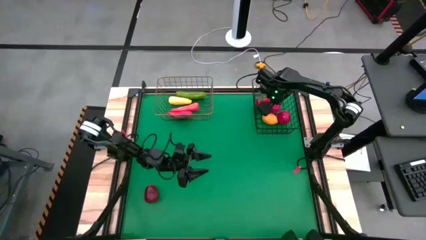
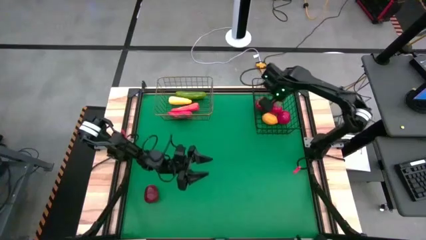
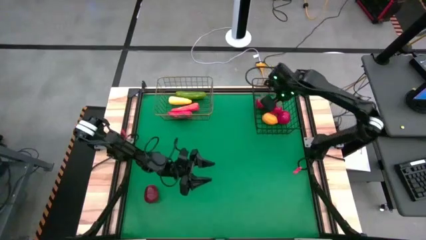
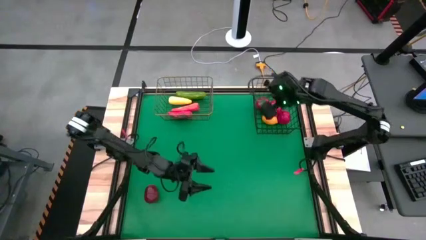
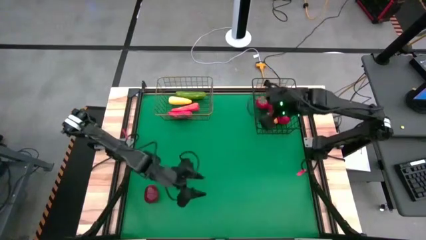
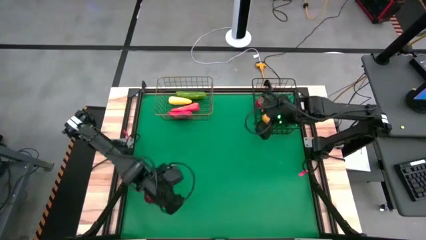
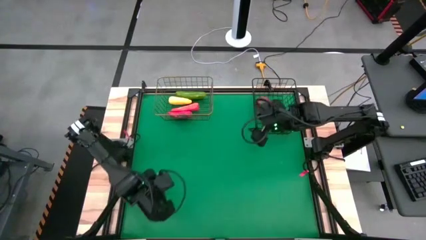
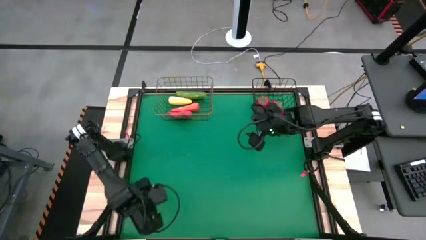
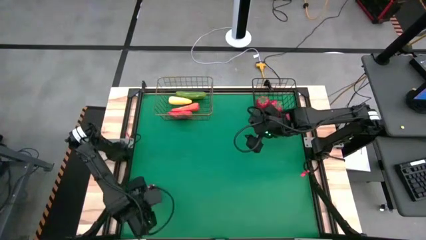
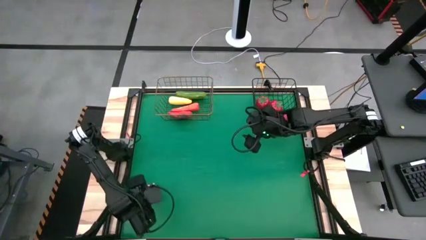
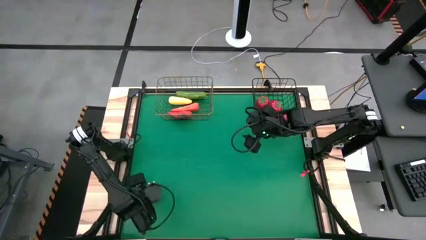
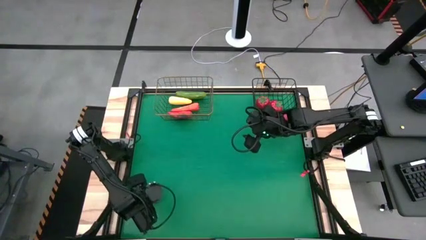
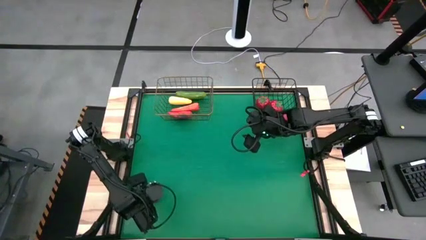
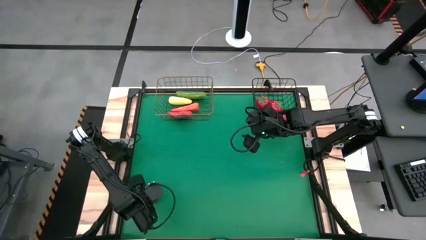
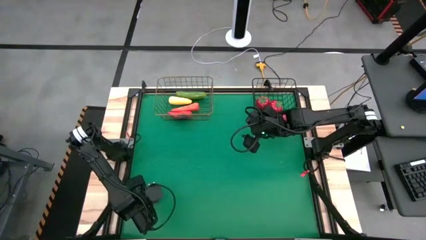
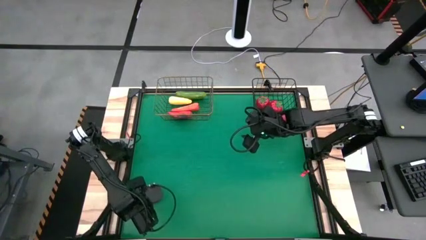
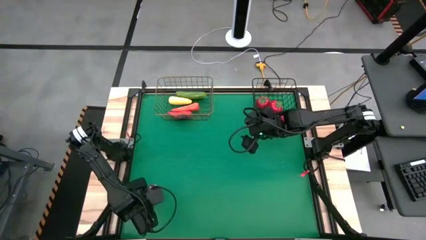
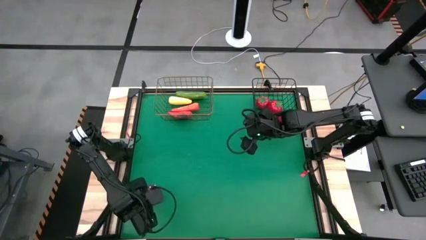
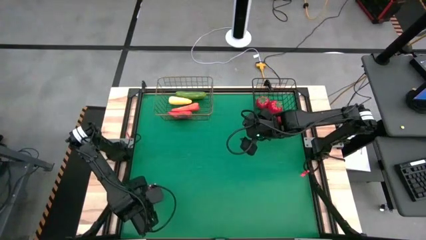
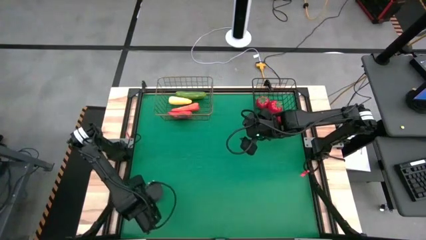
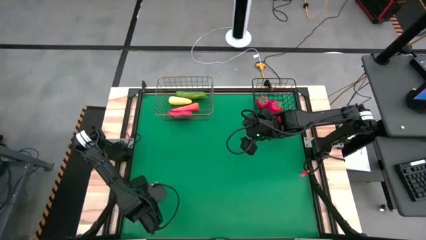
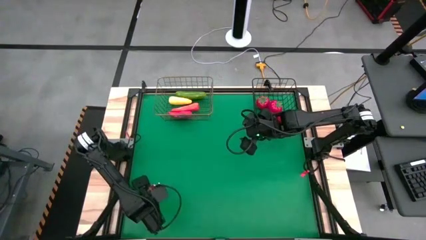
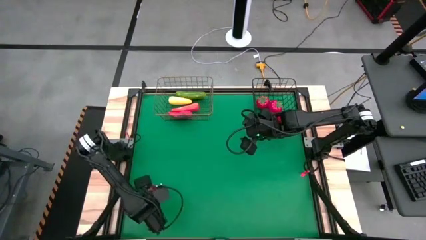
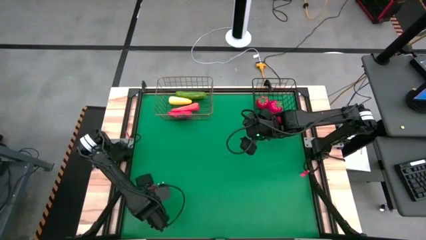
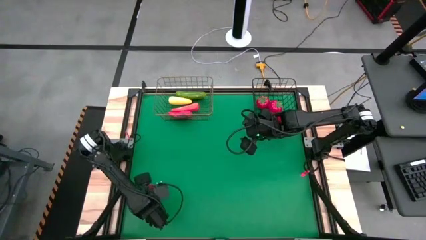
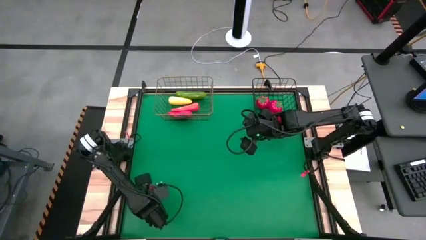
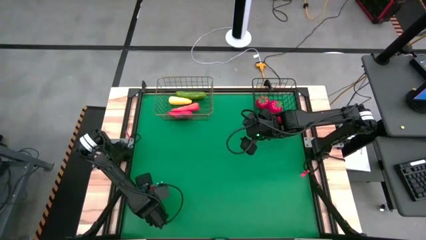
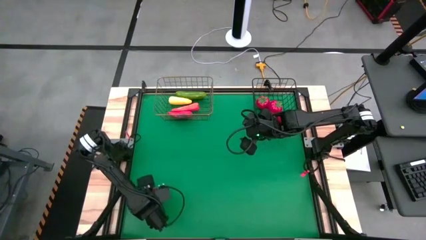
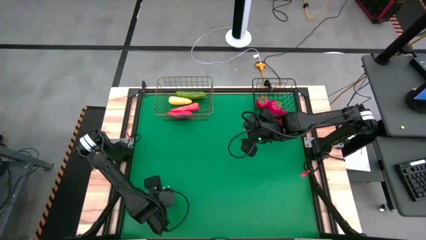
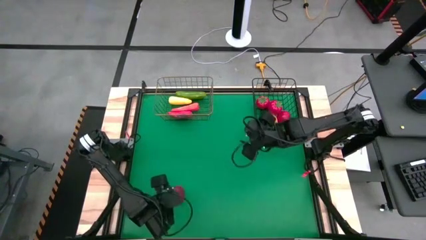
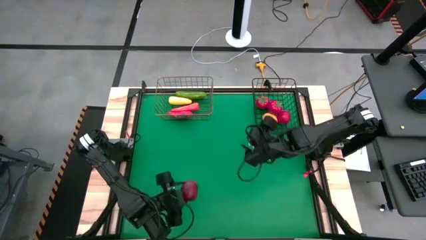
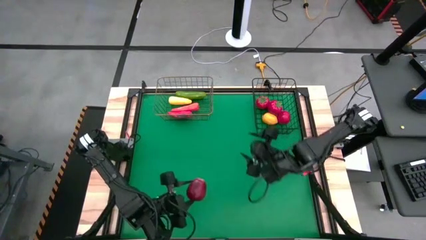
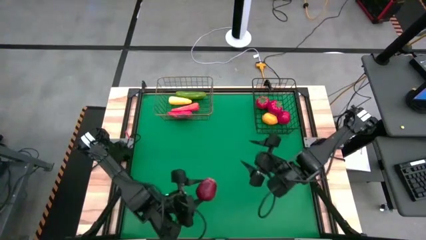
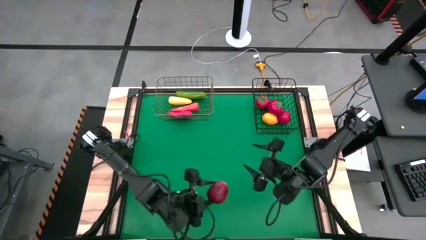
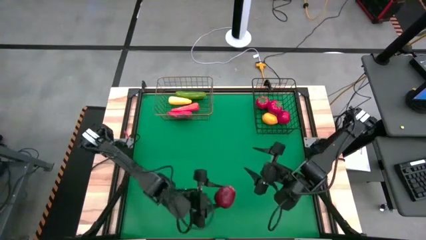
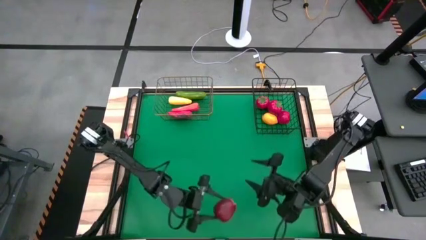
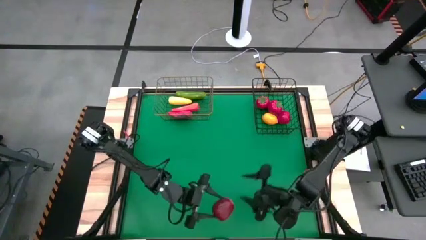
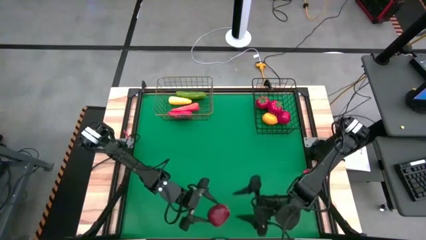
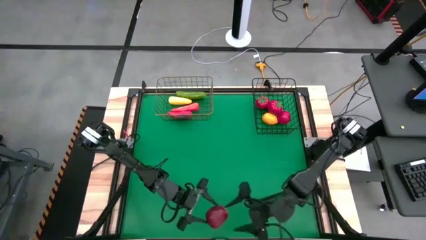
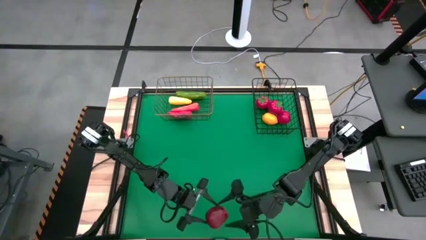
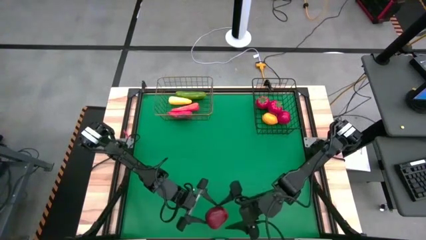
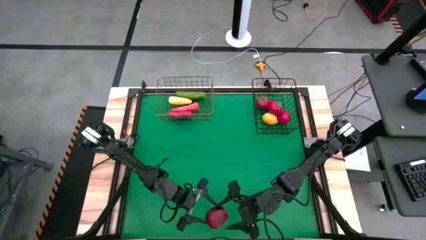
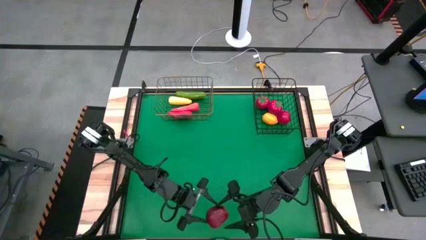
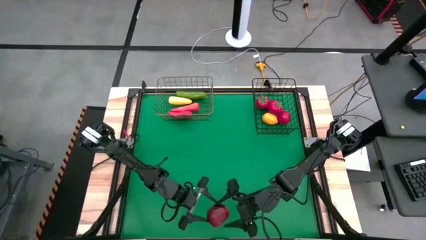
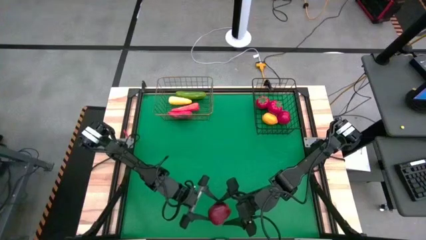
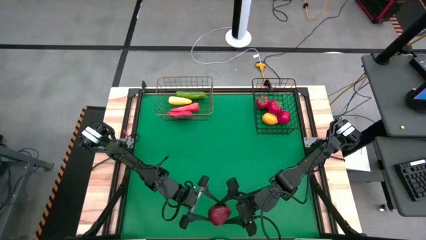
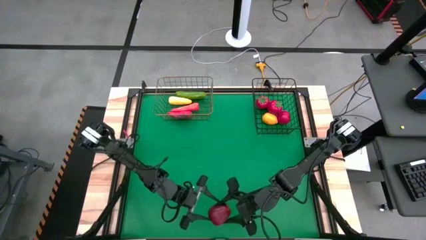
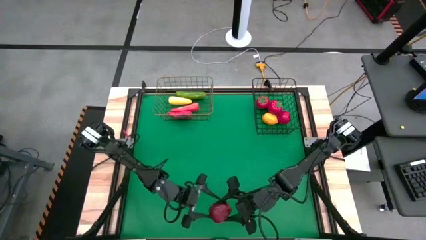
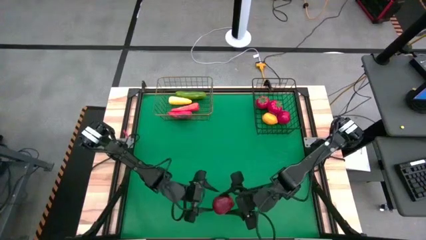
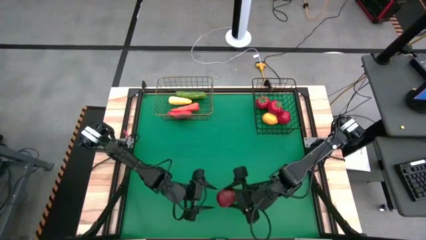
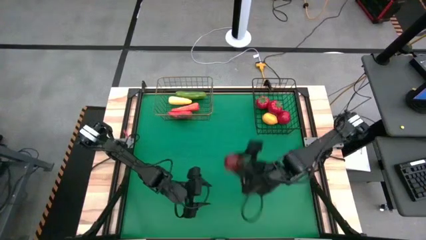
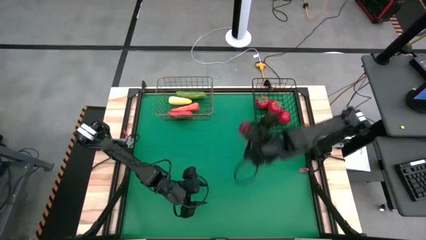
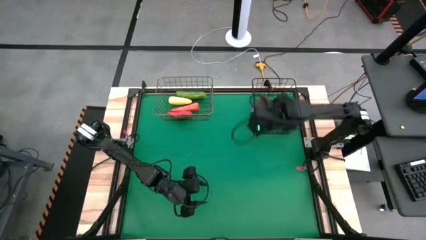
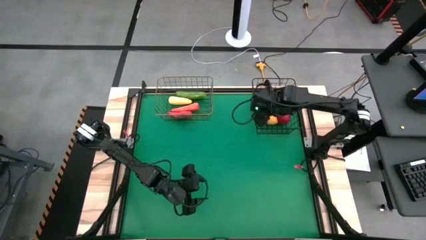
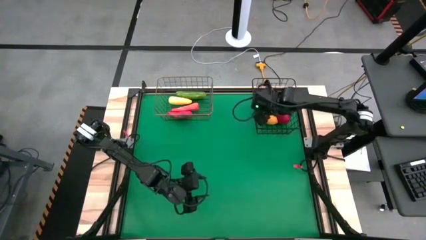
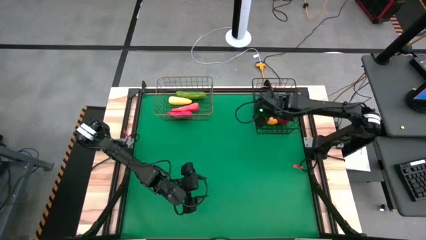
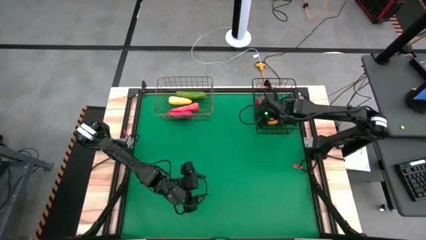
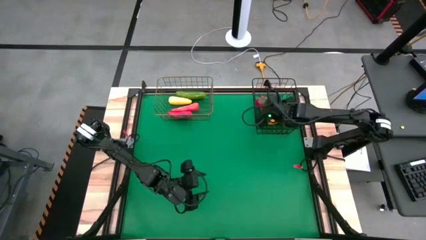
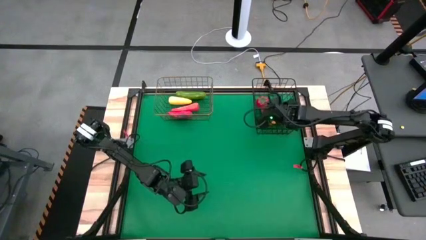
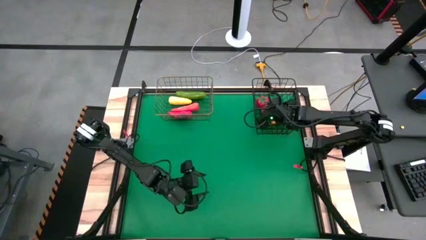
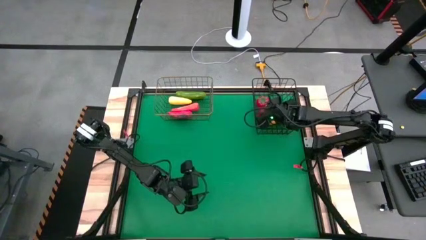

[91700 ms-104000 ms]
Task: Sort produce into baskets
Put the red apple into the black wire basket

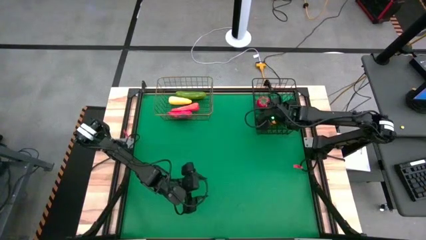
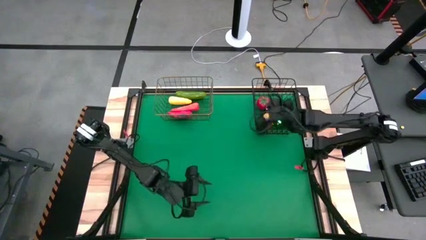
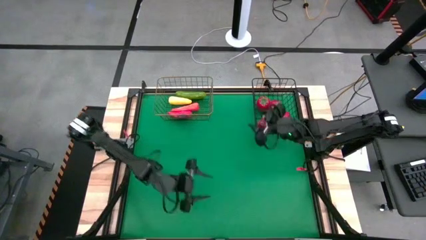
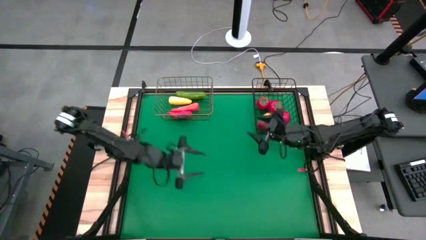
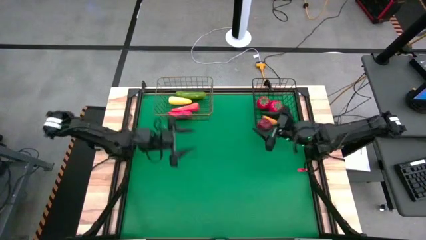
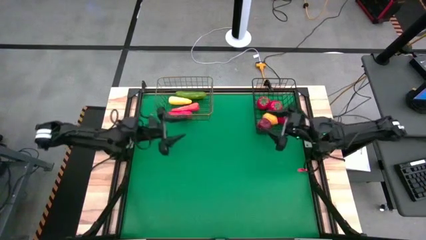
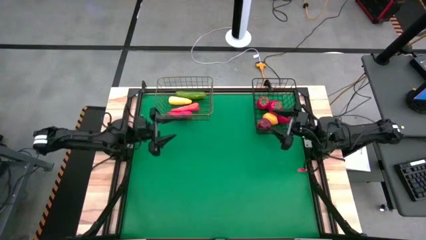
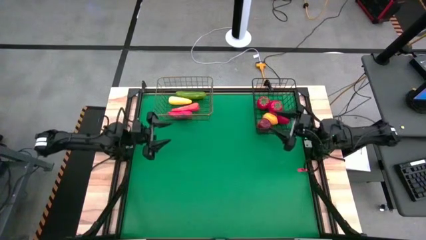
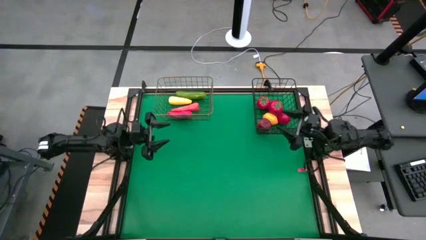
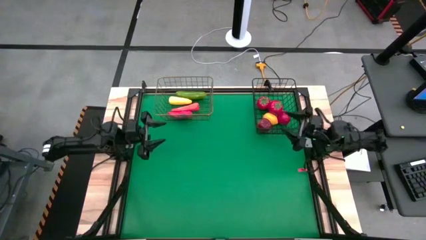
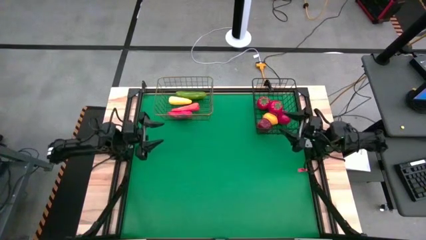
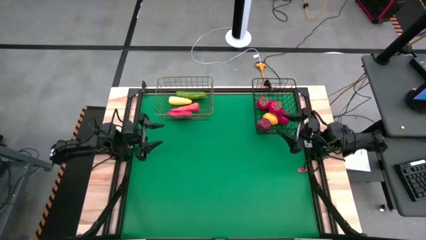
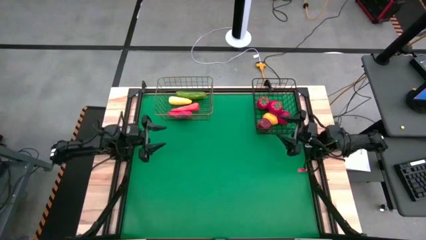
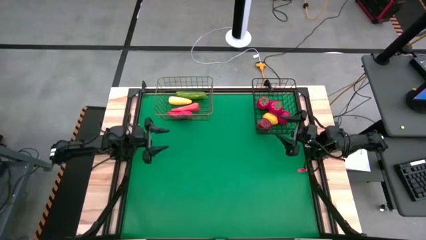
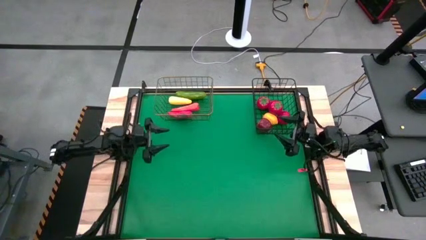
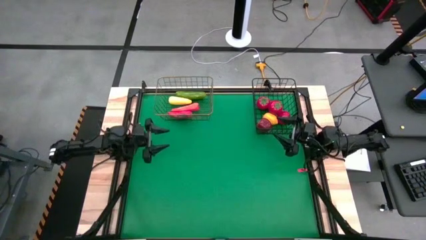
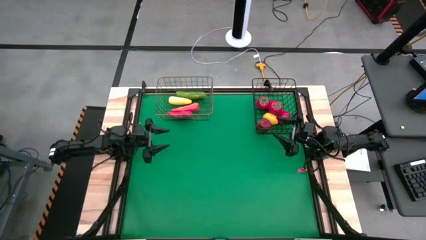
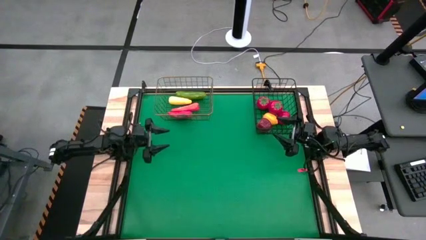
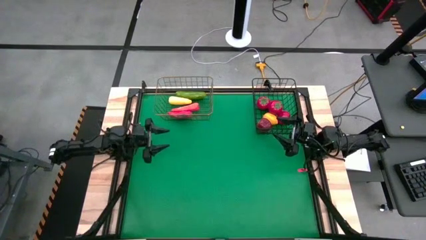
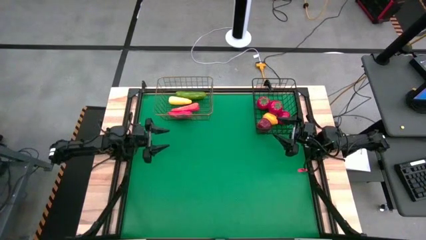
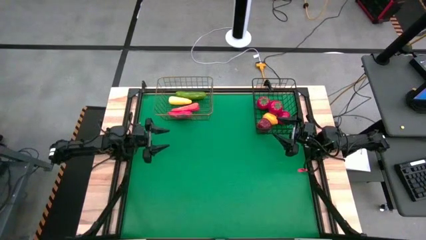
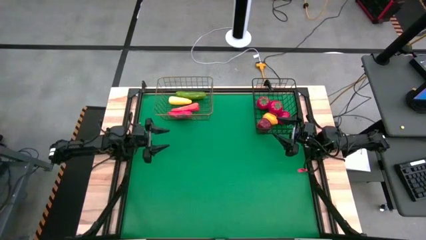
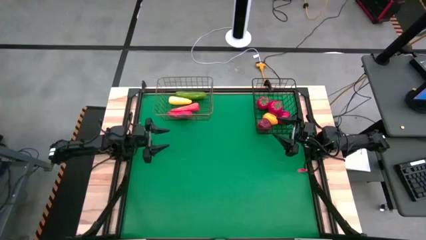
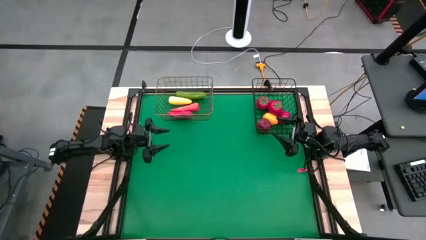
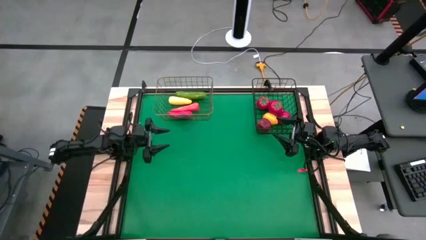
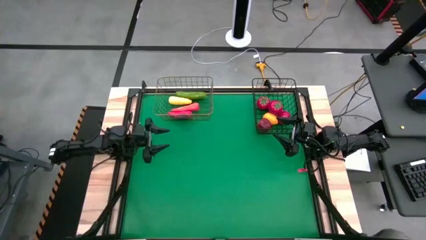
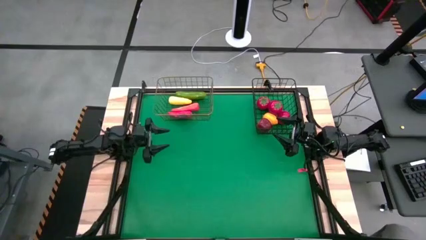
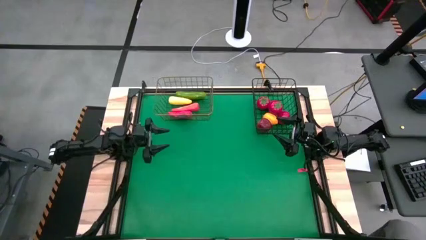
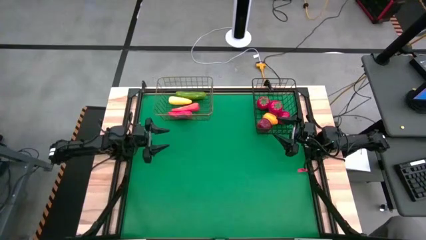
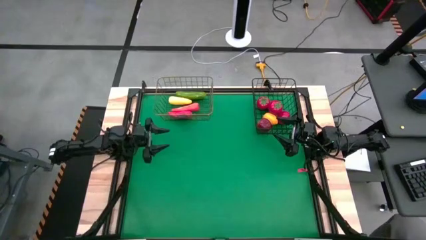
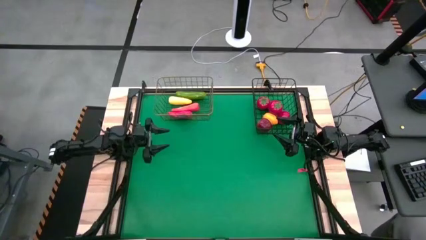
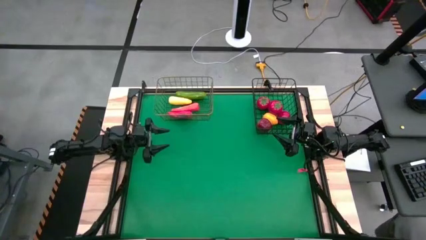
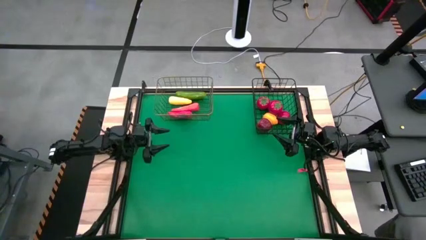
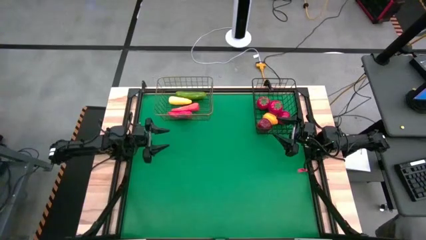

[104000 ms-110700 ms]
Return to home position
